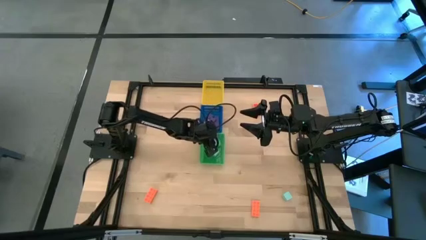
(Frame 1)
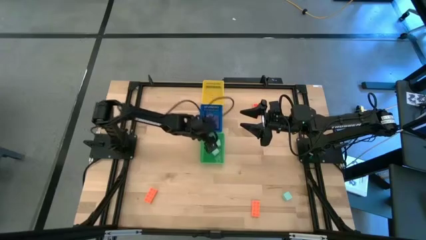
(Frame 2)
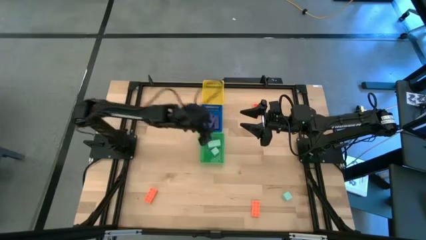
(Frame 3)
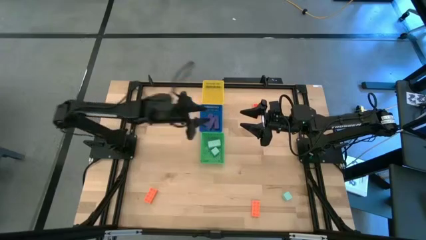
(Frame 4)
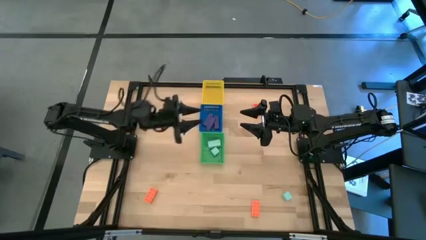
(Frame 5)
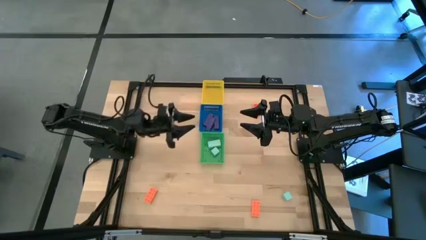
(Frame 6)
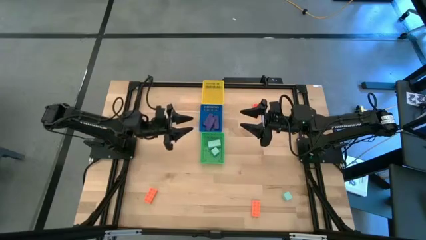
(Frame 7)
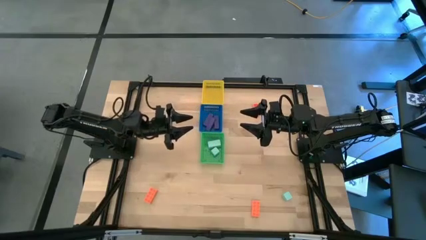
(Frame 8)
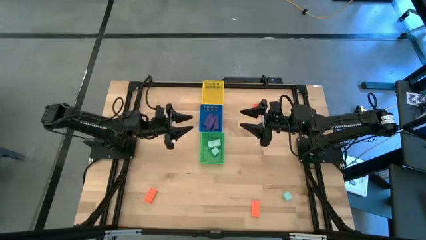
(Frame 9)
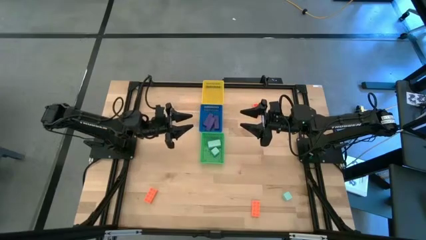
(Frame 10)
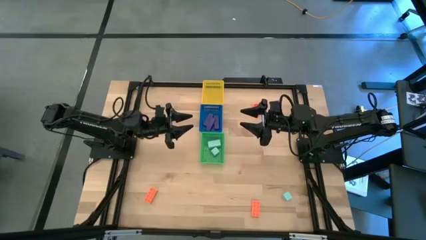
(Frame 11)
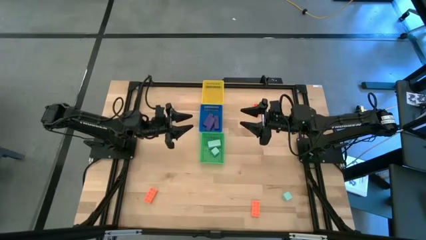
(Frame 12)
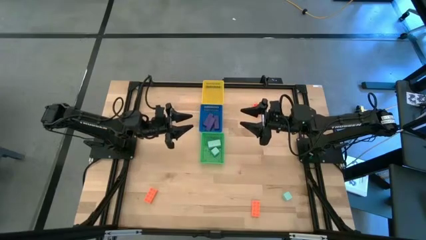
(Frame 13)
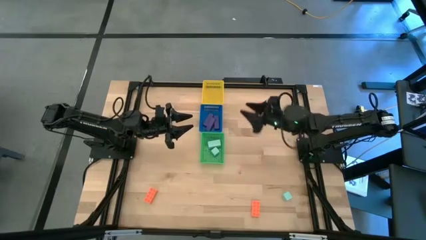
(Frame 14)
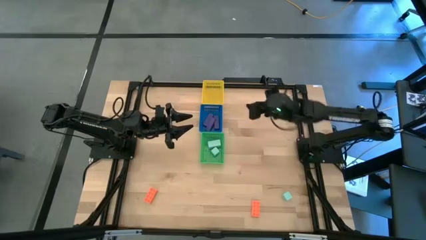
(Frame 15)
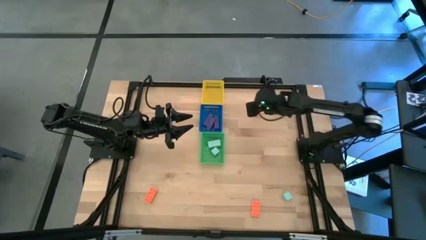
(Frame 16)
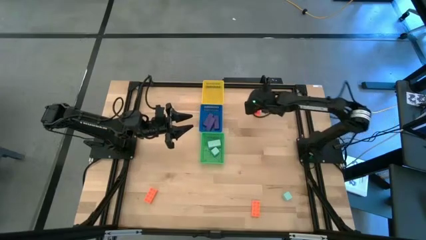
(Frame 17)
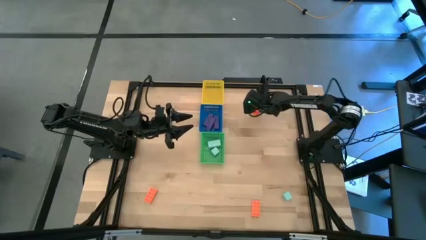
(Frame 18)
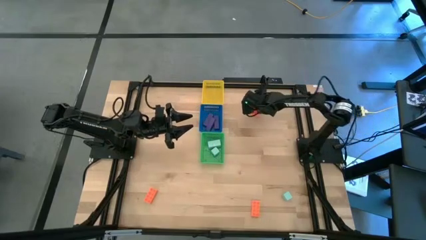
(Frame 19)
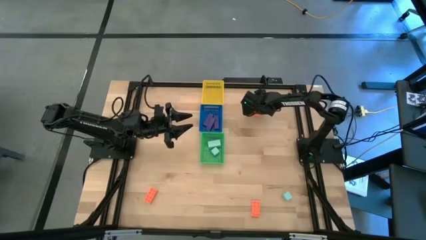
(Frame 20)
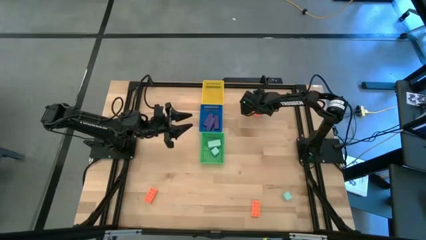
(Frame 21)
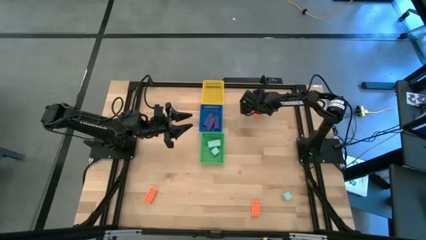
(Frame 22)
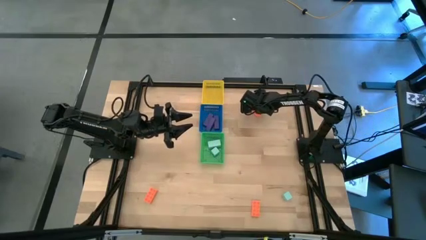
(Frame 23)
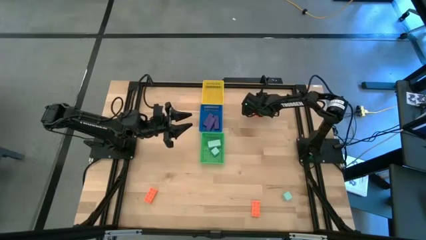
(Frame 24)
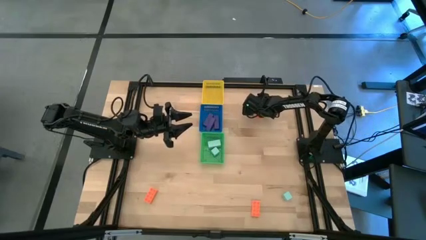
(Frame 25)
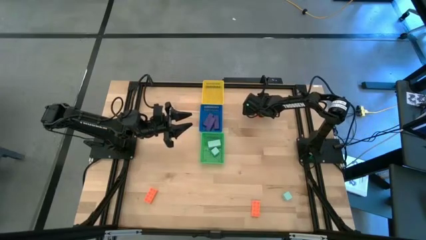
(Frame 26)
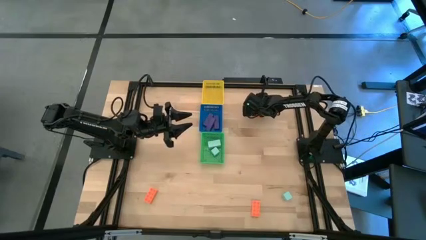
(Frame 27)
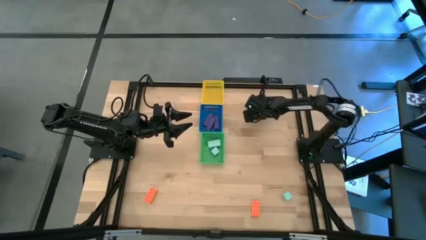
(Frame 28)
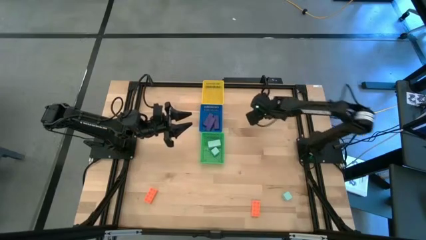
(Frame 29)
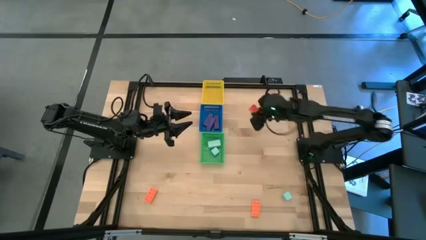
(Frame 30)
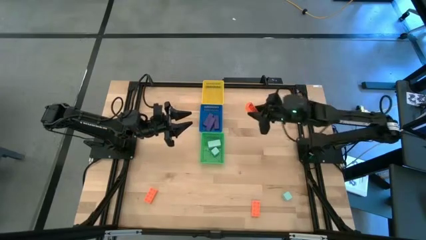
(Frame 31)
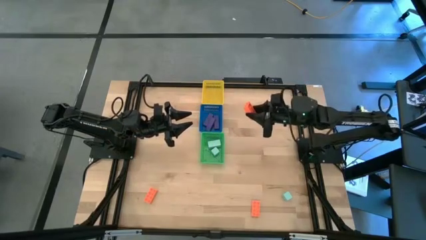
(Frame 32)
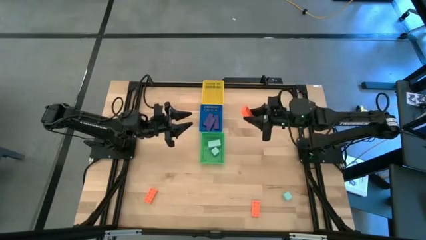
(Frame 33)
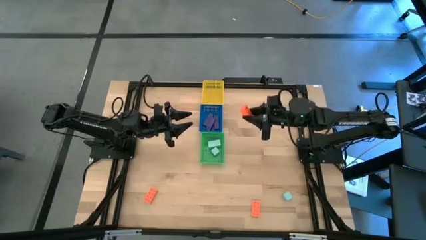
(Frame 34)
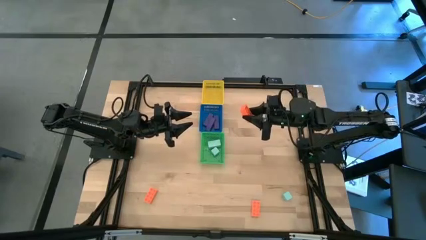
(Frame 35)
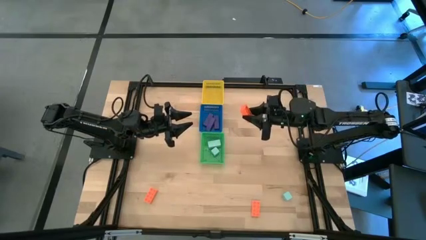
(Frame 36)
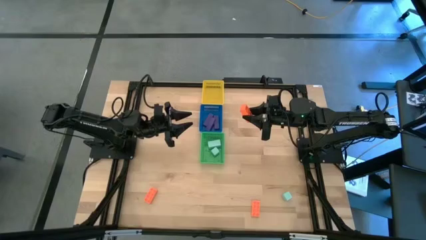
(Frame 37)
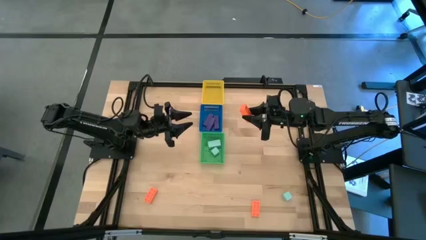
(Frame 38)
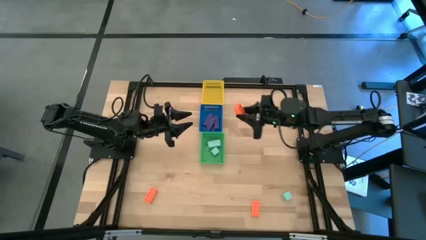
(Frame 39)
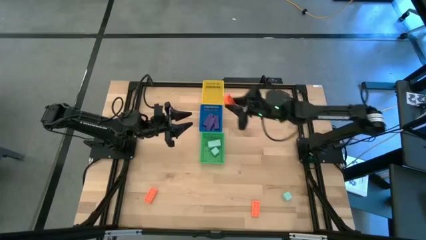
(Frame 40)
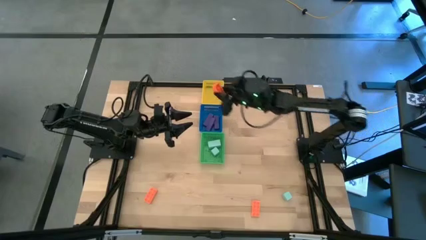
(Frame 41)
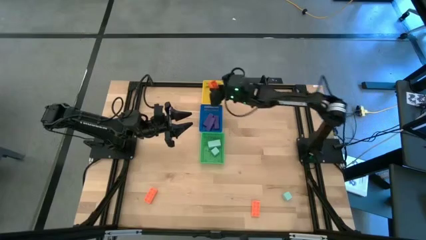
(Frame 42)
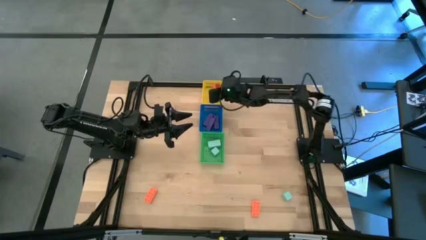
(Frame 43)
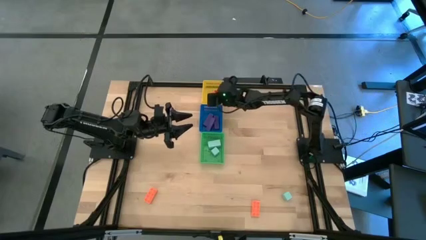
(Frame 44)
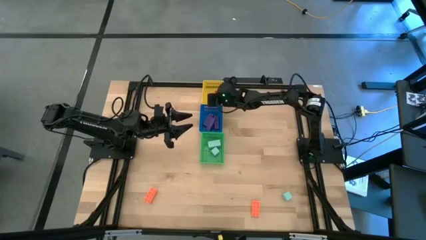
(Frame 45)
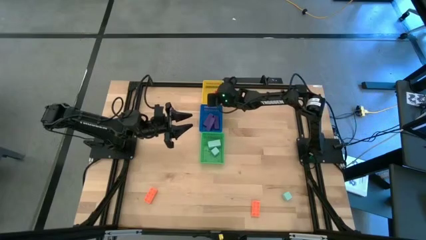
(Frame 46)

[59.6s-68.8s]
Task: Sort & place blocks by color
Put the top orange game piece into the yellow basket

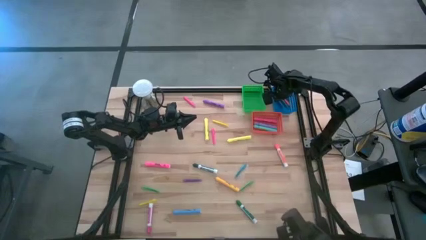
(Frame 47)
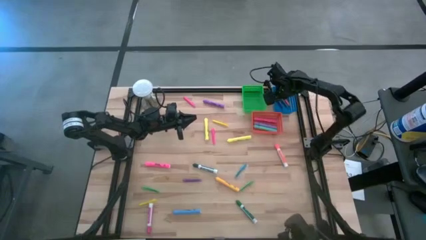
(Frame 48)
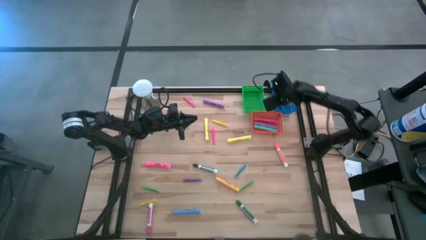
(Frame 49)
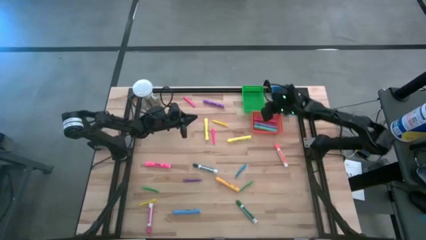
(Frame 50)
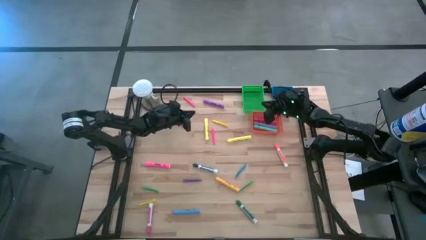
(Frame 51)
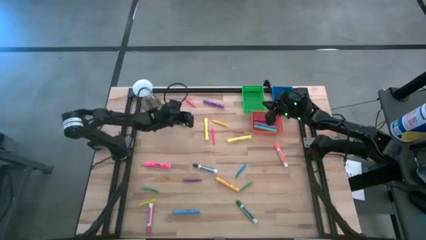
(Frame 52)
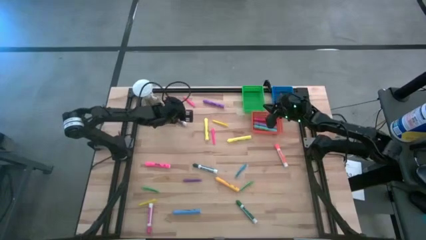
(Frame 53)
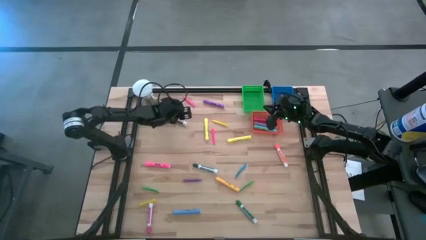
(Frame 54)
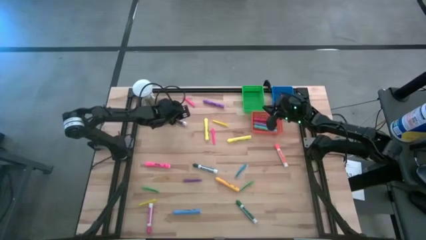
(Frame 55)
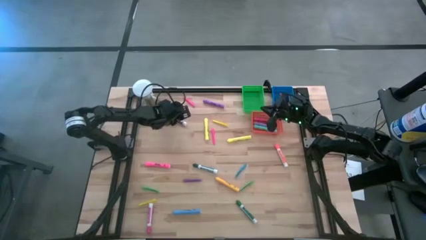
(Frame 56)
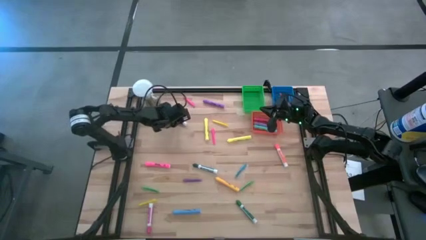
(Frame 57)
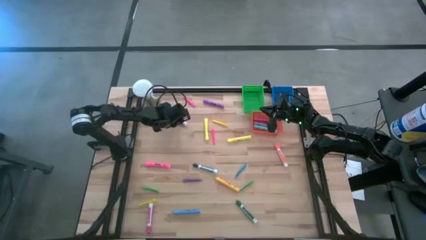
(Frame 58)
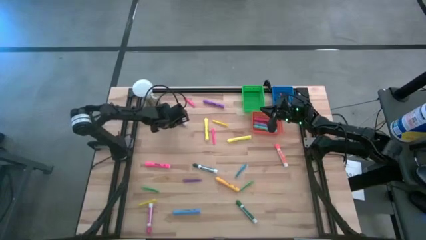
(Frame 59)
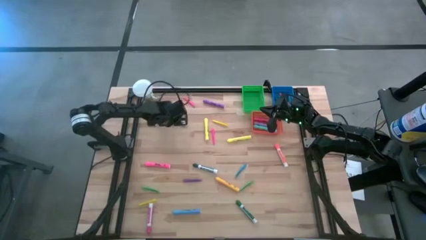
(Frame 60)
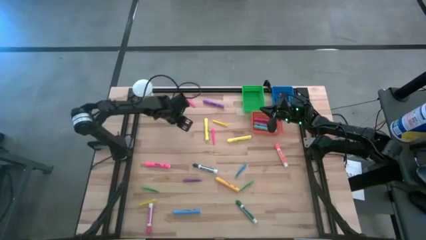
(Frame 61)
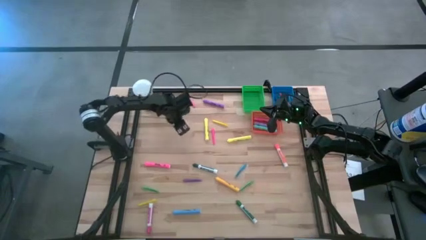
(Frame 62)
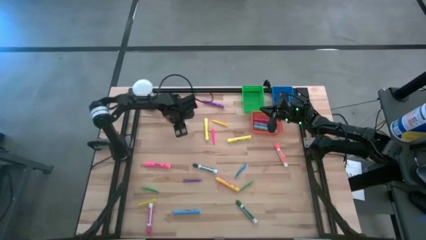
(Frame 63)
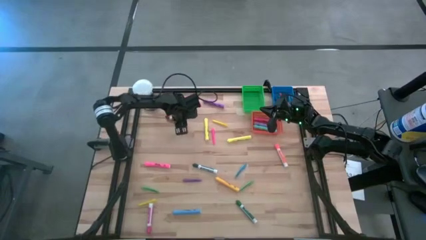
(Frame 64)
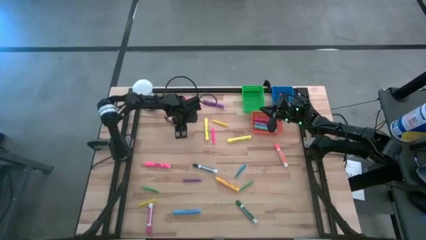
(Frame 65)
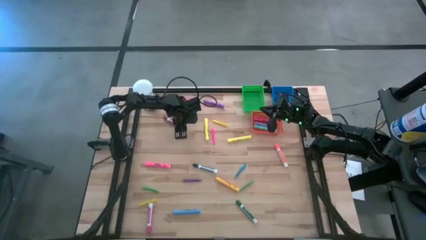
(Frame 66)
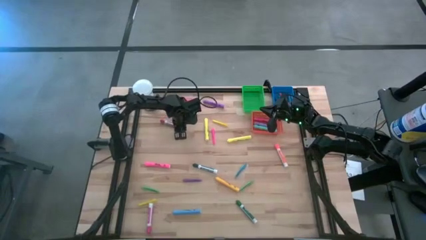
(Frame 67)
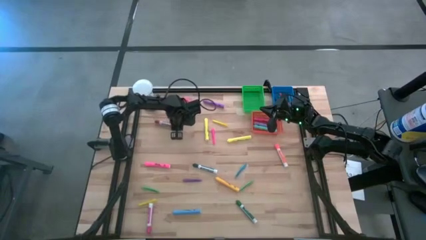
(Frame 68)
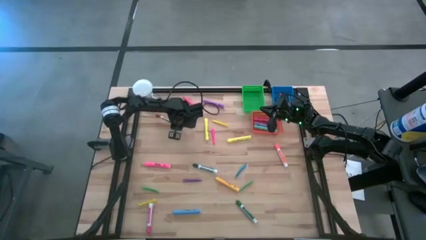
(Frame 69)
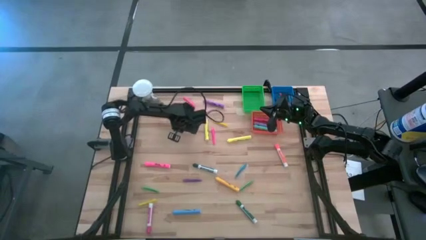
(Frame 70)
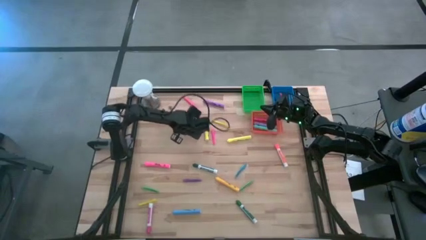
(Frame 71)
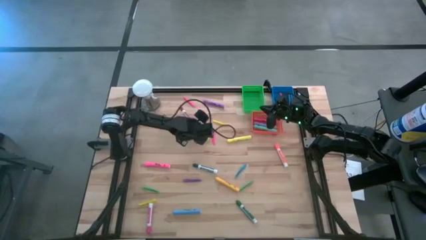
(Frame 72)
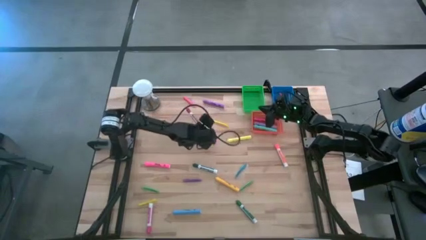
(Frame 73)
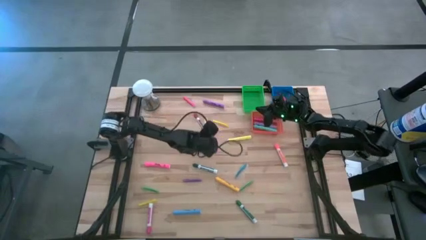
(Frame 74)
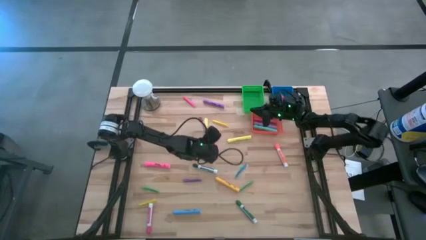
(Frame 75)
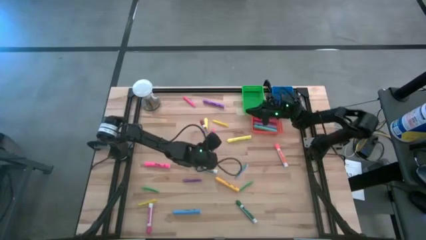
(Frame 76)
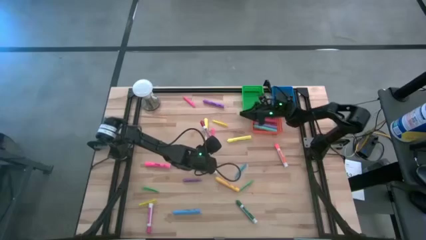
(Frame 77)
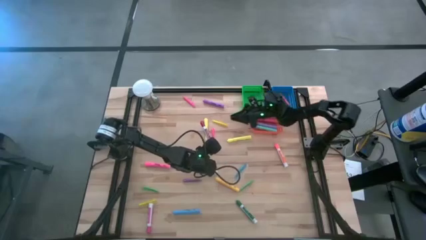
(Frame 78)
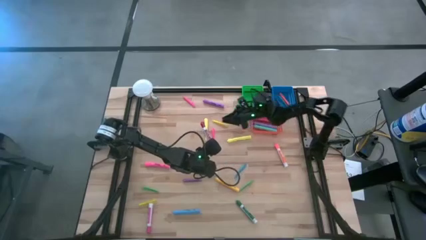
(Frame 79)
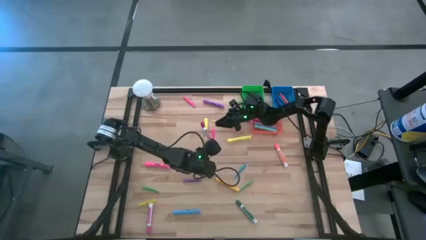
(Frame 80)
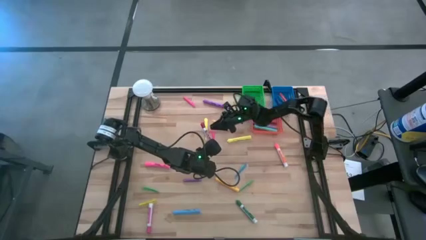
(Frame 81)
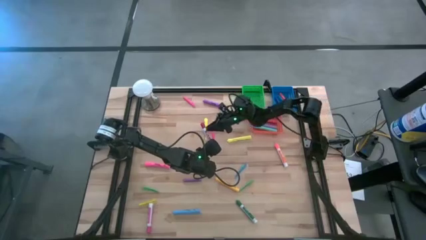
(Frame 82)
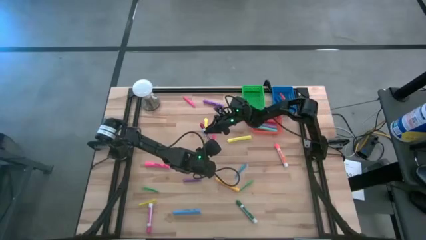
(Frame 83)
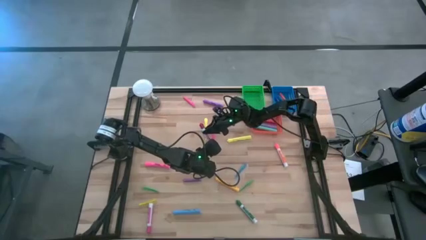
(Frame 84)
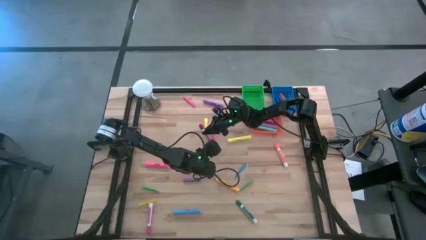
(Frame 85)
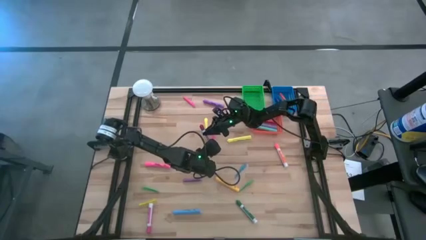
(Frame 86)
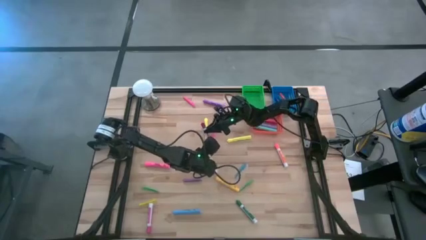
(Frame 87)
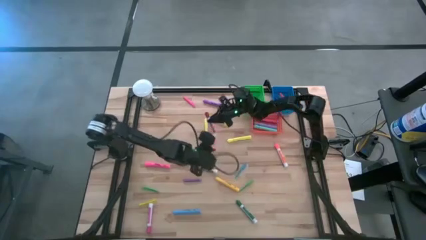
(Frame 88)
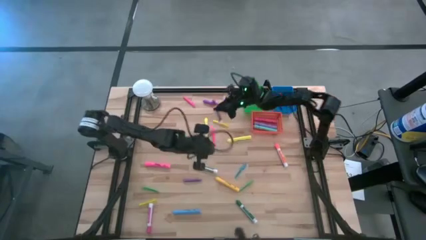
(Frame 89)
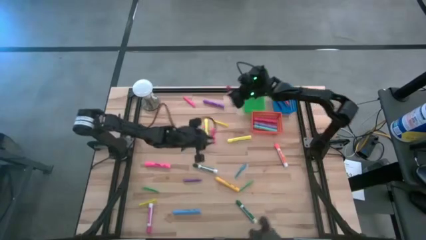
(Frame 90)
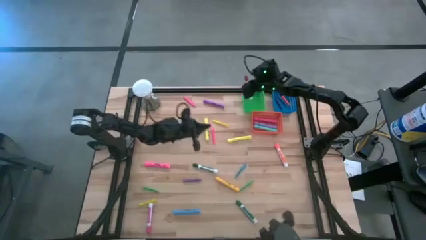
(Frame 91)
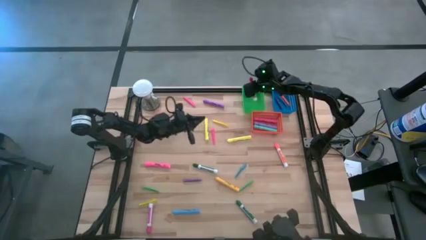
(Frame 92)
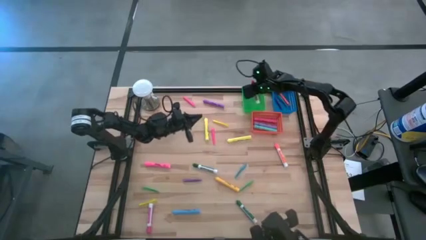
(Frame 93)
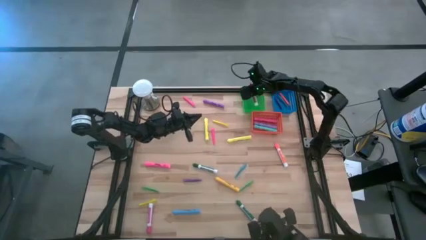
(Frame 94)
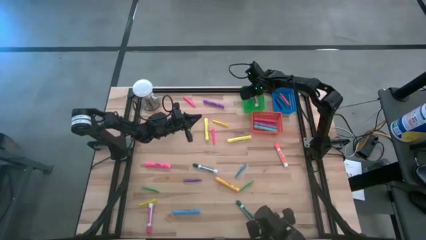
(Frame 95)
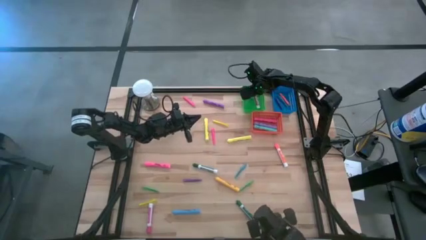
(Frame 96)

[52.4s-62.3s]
Task: Pick & Place Markers
Put the red marker pen into the green bin
